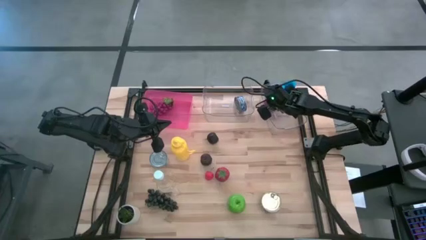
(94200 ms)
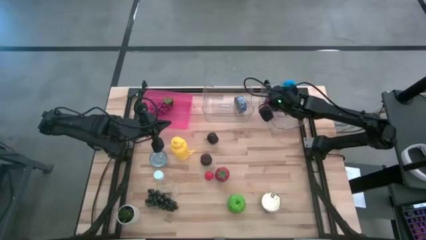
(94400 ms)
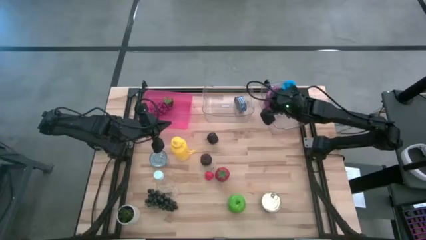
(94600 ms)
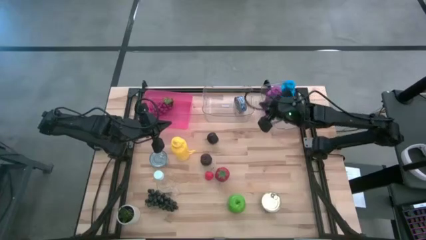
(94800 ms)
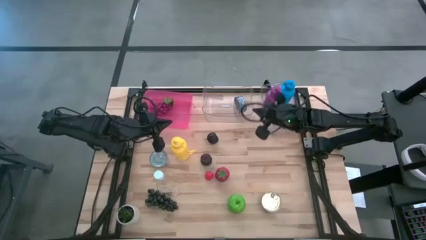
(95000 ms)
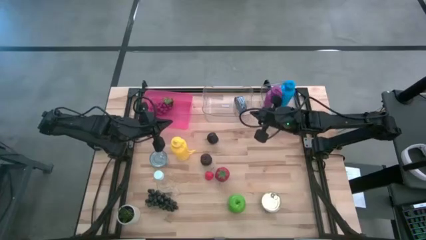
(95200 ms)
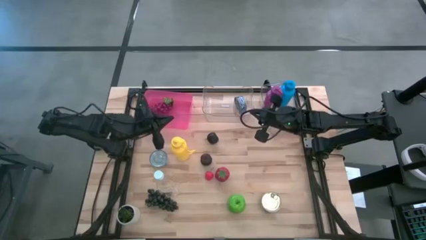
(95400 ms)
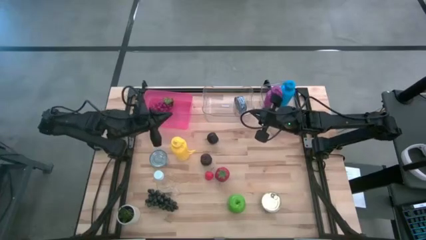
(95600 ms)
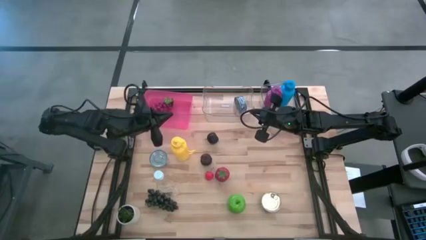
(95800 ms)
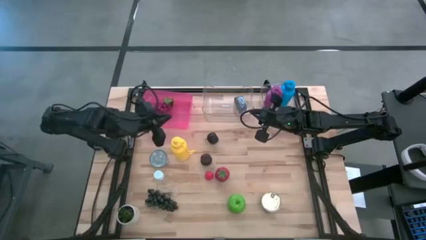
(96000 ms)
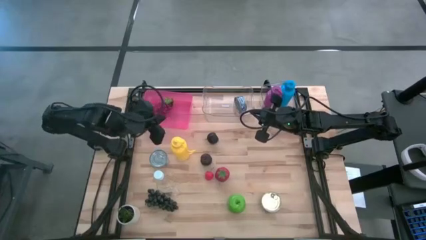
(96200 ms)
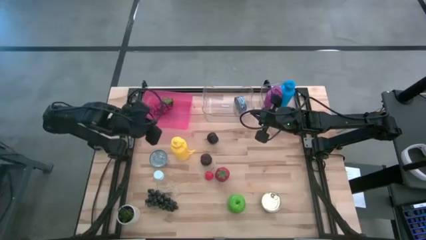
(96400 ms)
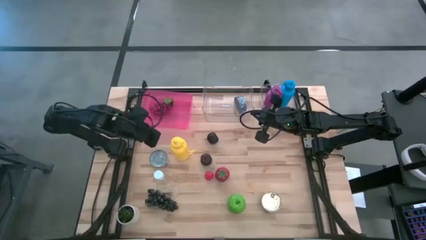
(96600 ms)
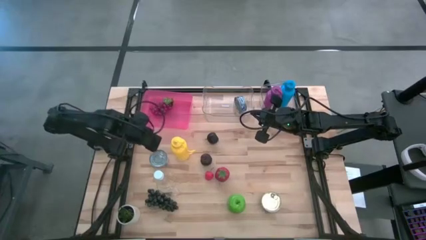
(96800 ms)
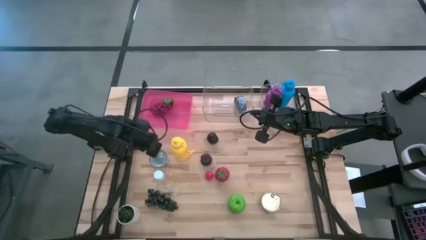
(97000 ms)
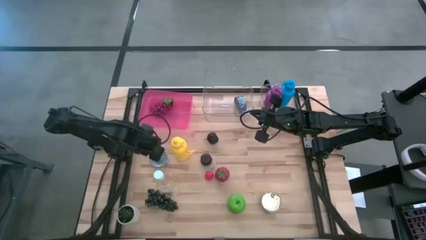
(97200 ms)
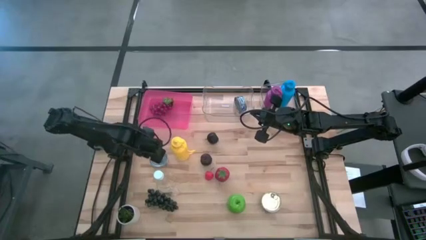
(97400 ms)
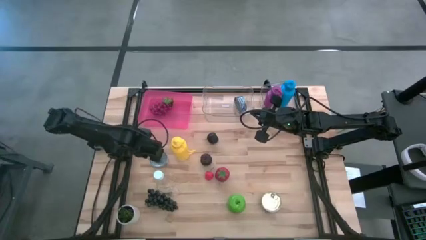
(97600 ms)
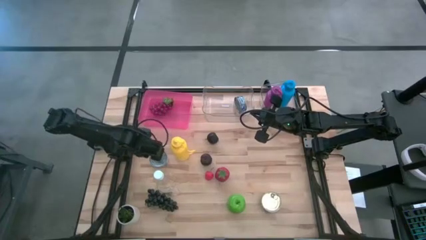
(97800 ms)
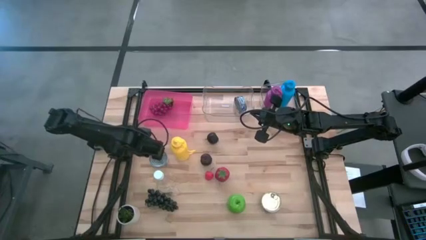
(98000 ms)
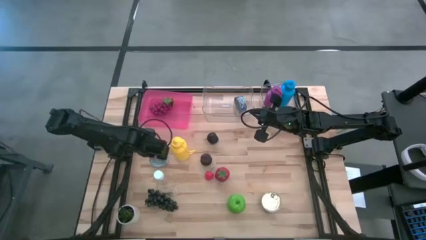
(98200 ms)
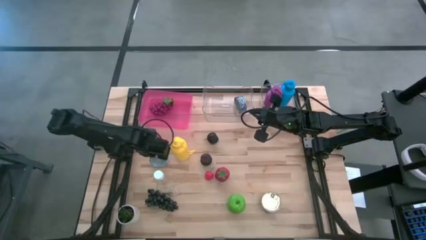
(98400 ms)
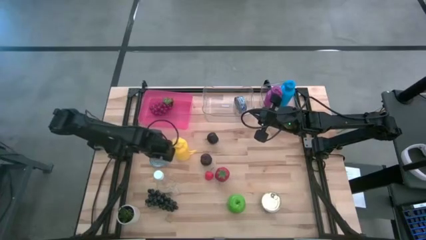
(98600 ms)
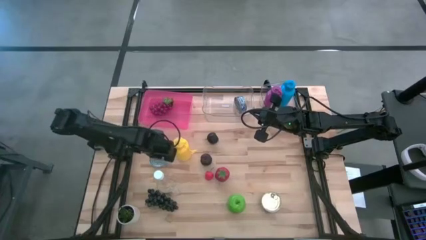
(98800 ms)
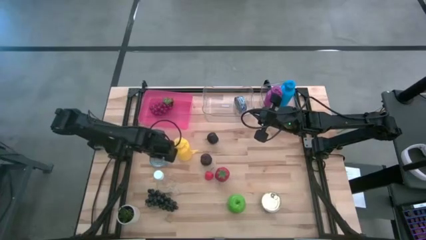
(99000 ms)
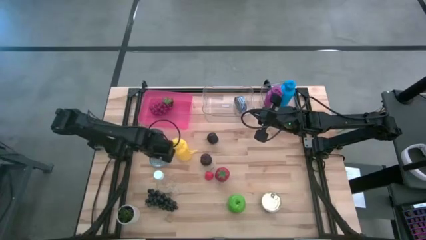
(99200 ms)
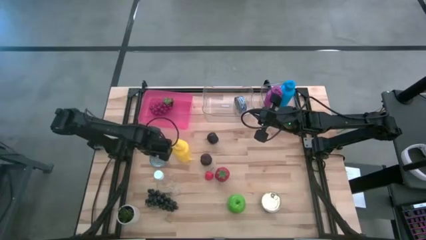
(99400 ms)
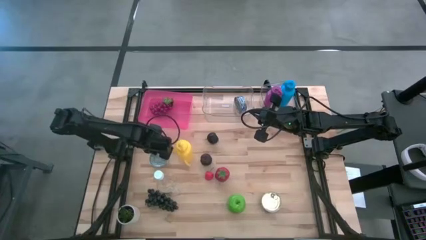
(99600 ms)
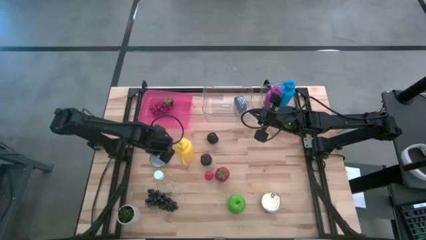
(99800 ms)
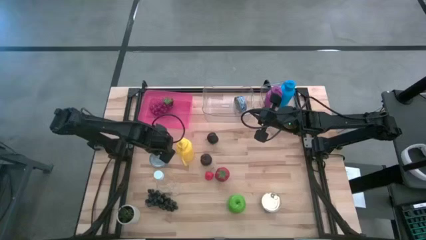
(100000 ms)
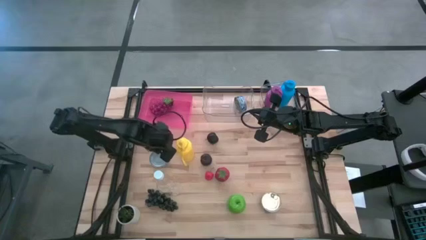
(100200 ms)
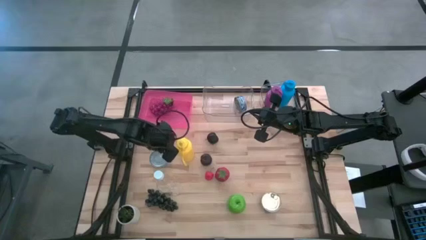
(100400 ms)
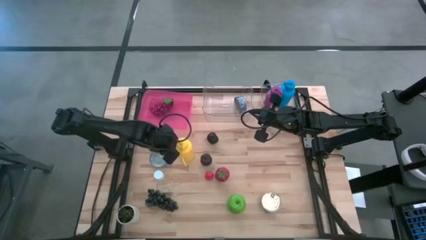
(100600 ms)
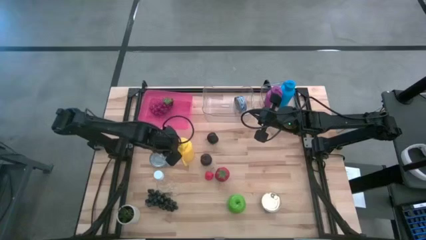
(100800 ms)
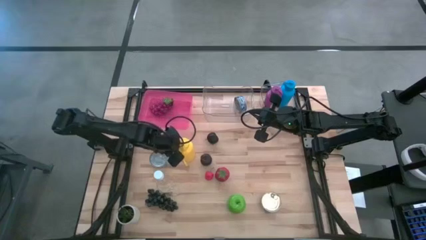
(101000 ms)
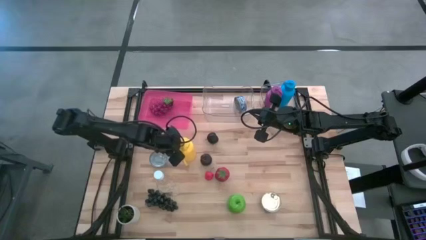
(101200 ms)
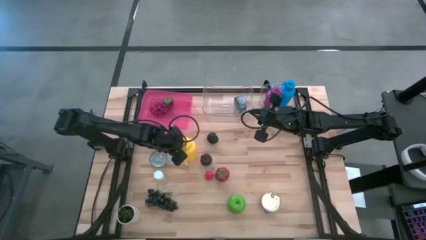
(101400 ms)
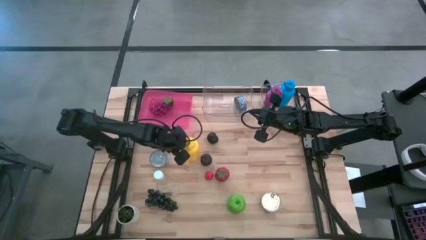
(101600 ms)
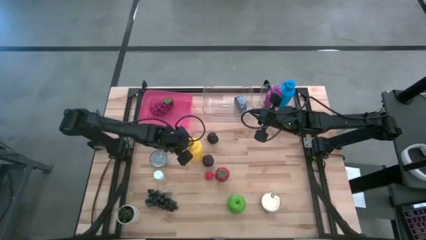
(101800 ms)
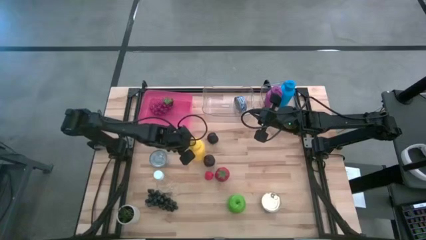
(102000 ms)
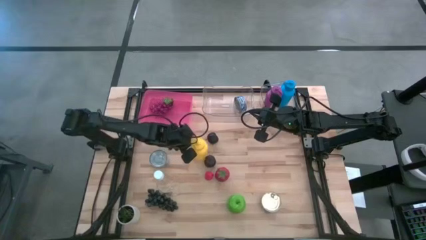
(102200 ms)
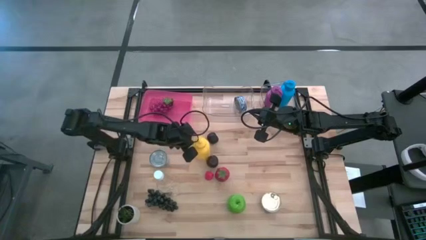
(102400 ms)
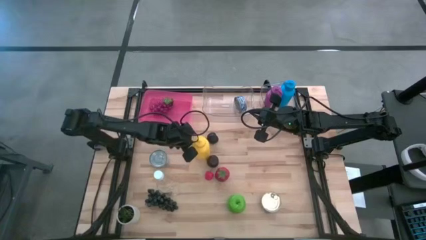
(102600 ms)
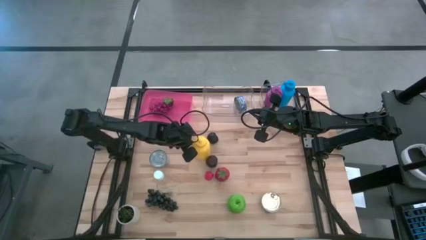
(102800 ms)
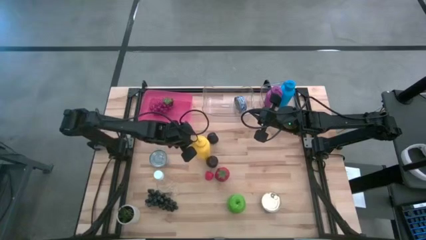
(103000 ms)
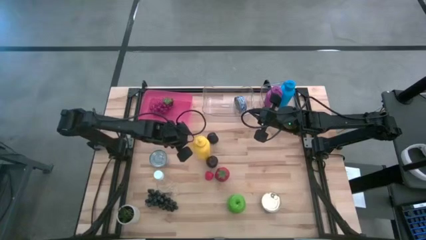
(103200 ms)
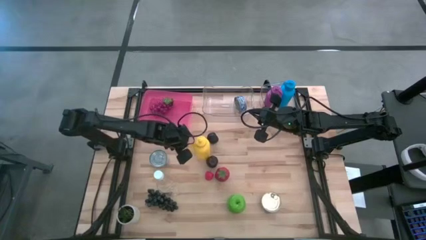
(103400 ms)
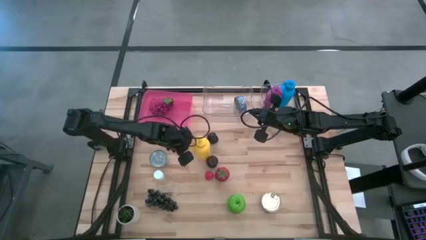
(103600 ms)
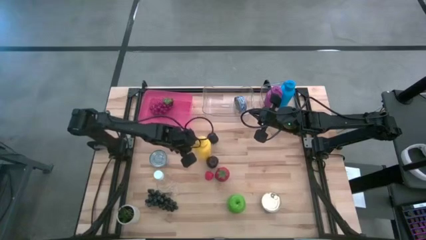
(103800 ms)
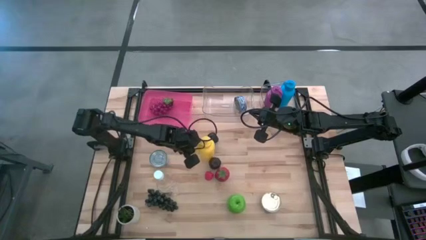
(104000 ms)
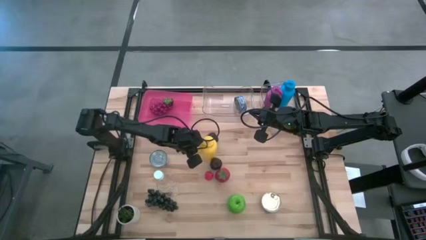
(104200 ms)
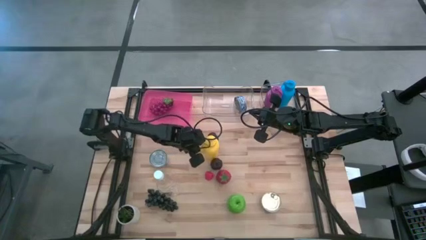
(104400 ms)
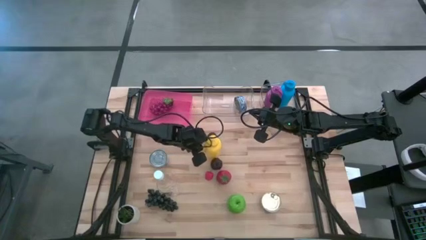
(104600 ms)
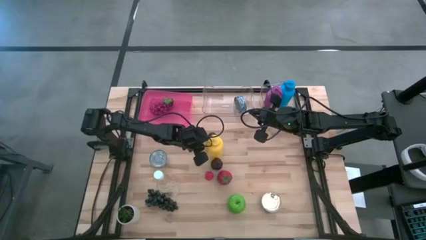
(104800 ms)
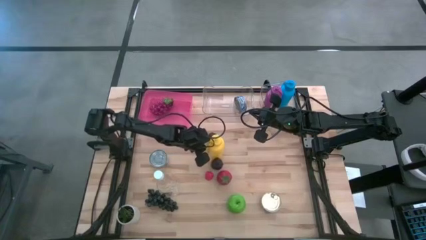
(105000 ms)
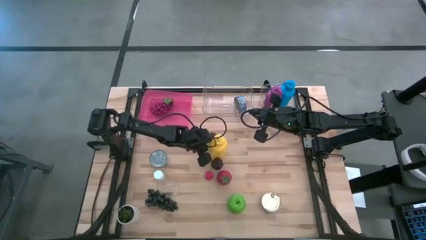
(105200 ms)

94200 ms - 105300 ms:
Task: Pick & Place Food Item
Put the yellow water bottle into the right transparent bin

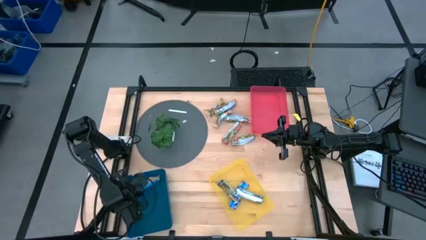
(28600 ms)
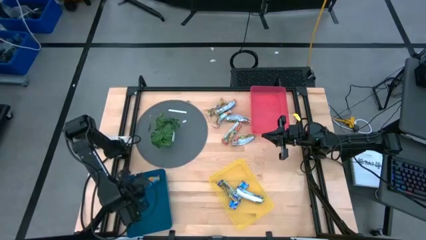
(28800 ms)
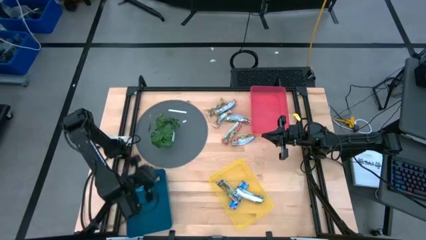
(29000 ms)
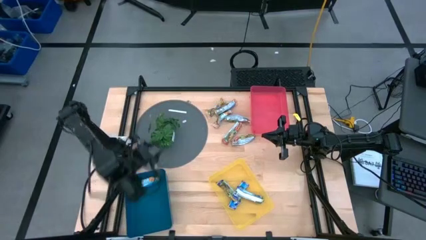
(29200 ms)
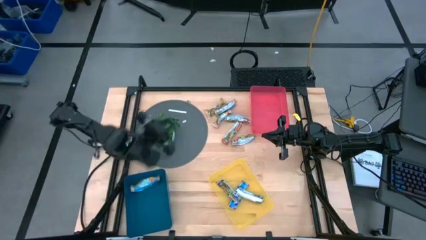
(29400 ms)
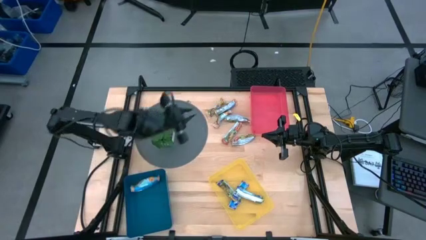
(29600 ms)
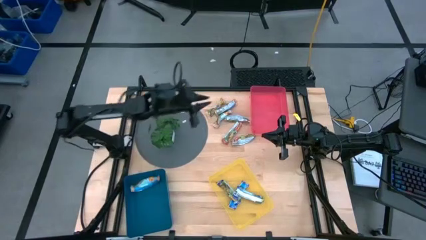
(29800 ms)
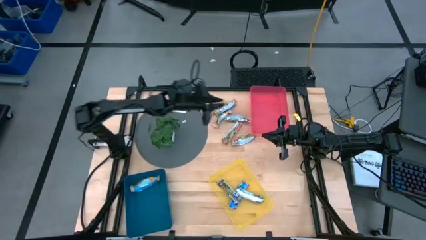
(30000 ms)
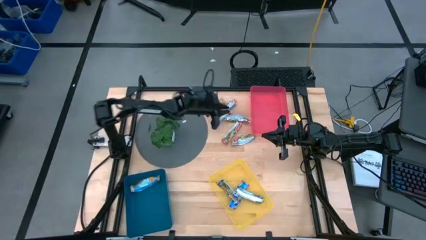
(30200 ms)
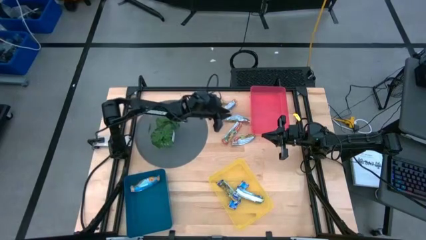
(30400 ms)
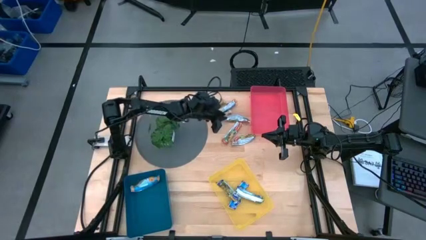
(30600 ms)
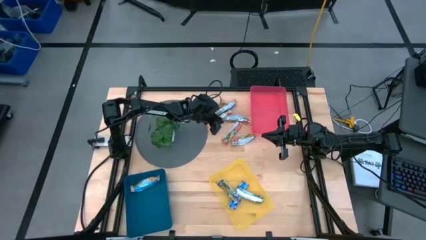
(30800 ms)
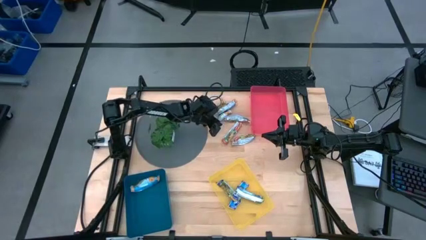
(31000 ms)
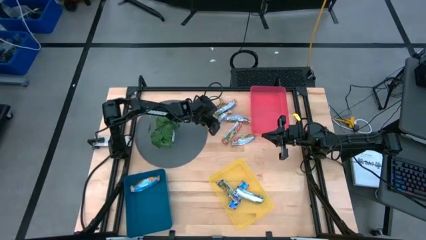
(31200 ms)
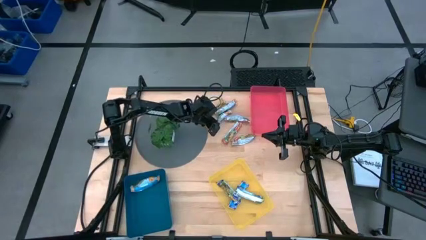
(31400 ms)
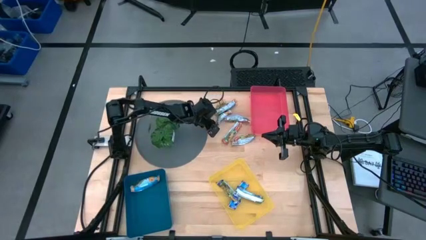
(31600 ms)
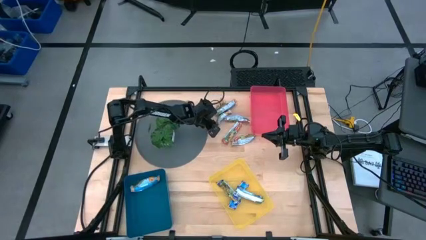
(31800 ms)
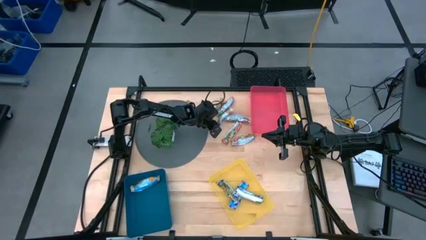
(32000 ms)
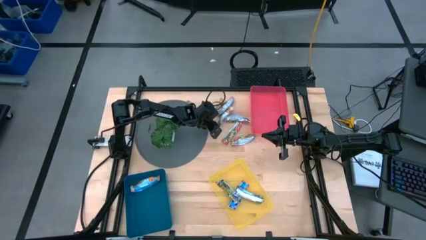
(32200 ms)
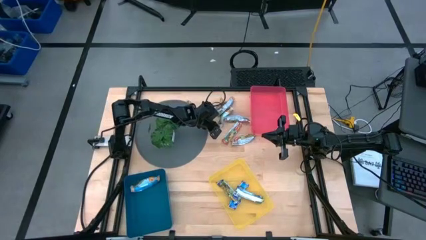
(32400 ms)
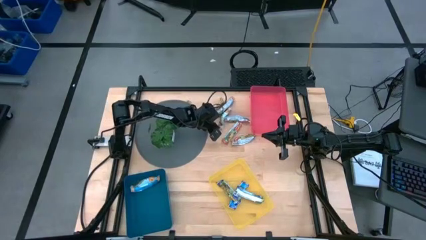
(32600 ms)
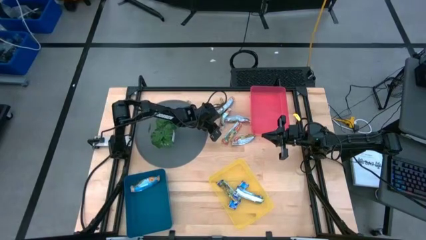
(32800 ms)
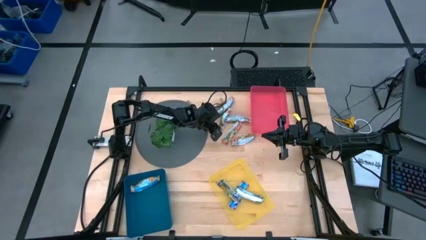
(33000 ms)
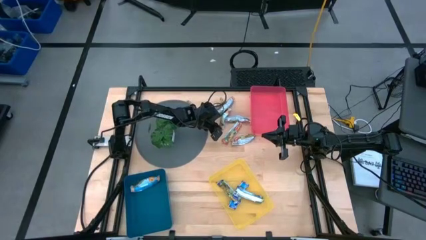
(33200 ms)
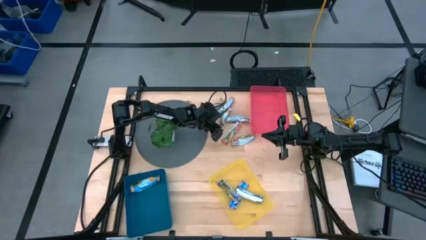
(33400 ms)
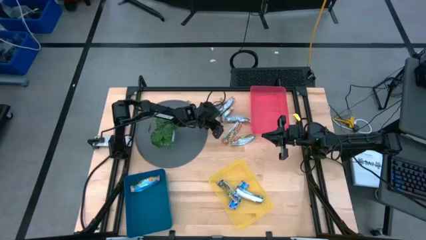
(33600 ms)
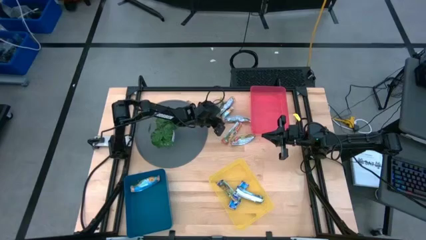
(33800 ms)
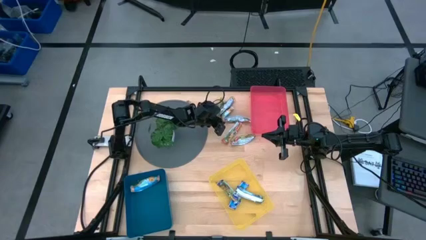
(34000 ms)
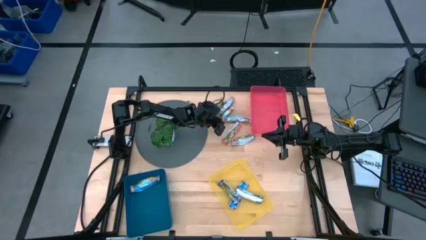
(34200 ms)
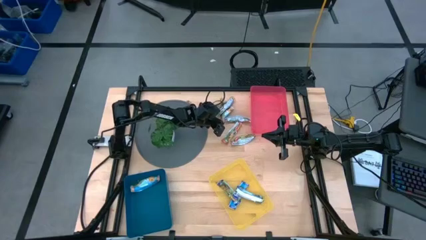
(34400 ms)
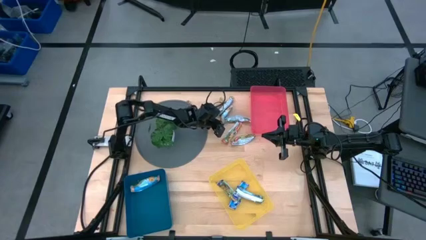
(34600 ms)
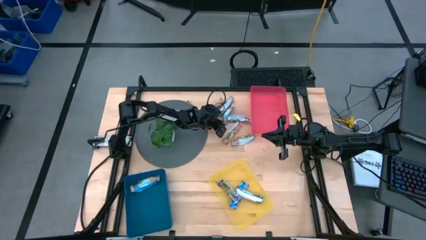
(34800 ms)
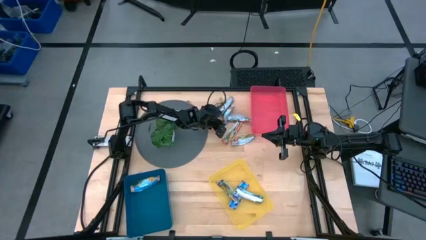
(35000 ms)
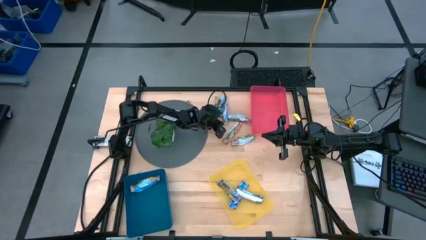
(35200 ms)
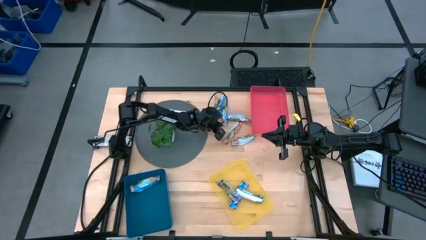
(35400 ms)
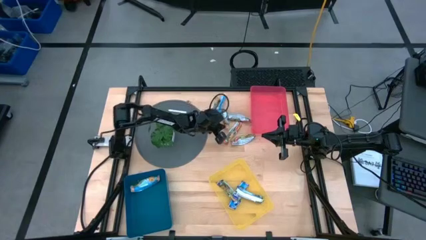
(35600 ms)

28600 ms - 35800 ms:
Task: Pick and place Granola Bars by type
Put the yellow snack into the blue bin
